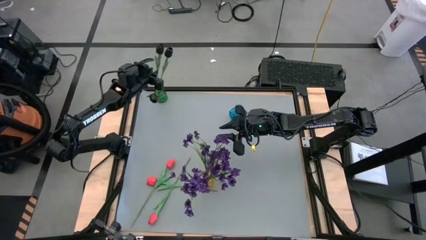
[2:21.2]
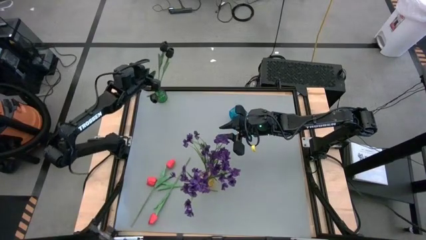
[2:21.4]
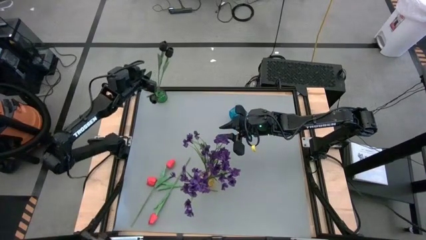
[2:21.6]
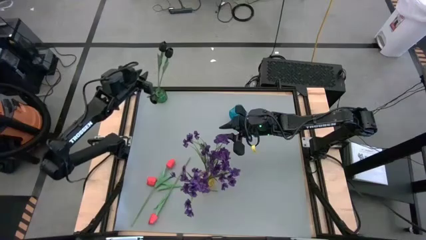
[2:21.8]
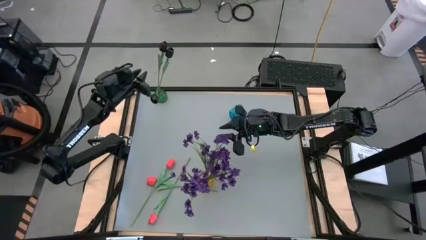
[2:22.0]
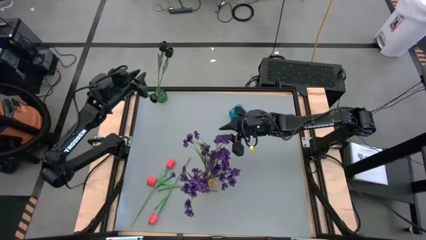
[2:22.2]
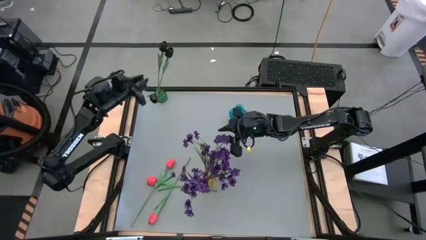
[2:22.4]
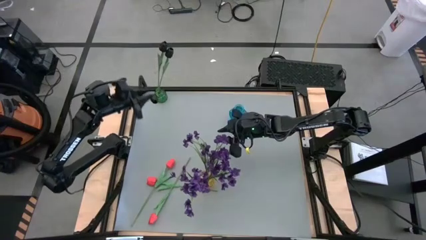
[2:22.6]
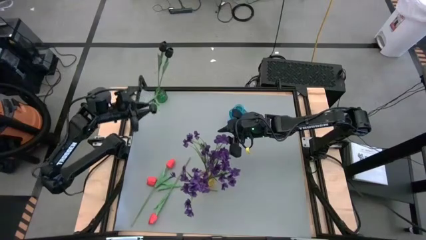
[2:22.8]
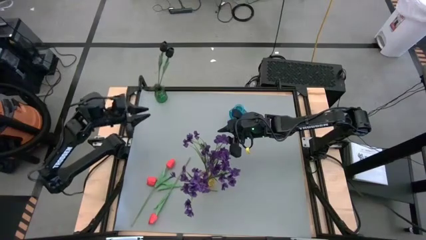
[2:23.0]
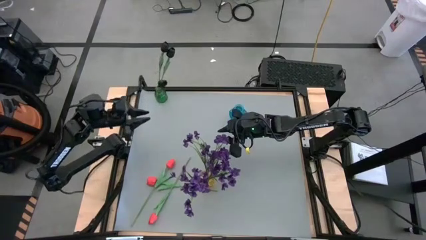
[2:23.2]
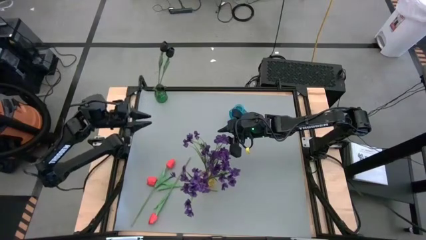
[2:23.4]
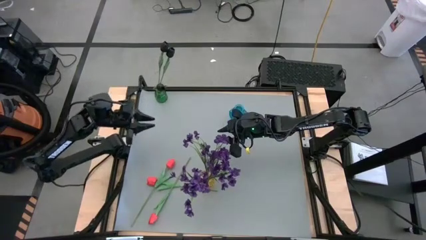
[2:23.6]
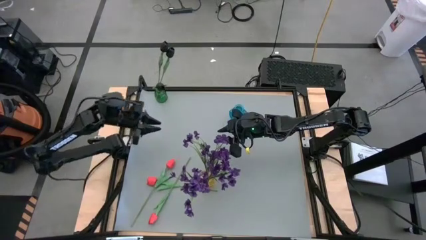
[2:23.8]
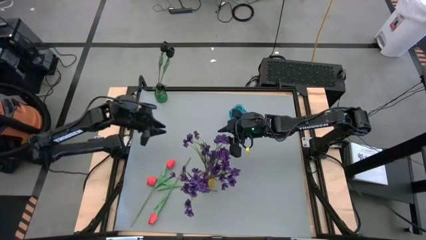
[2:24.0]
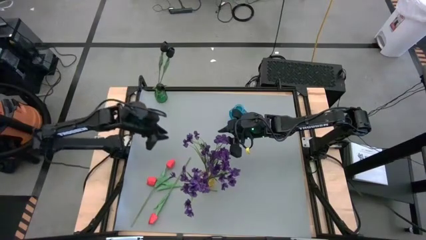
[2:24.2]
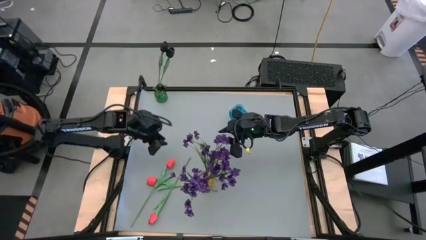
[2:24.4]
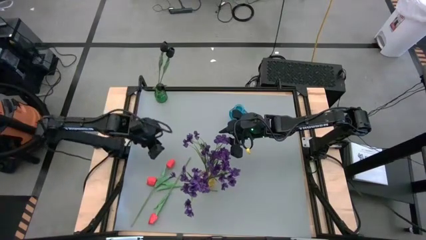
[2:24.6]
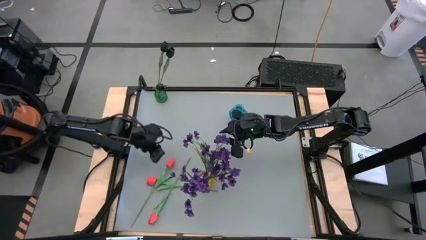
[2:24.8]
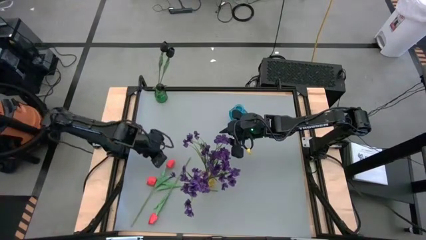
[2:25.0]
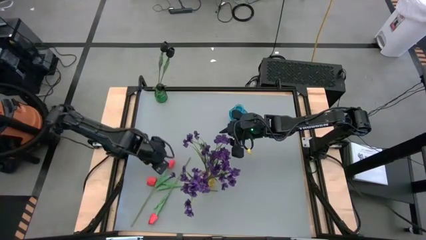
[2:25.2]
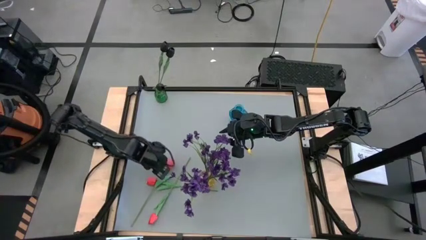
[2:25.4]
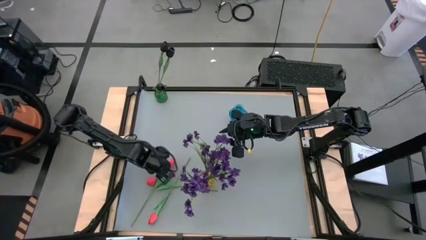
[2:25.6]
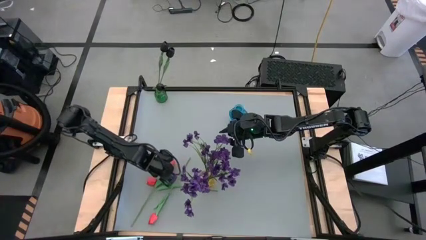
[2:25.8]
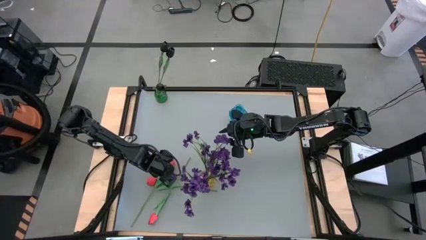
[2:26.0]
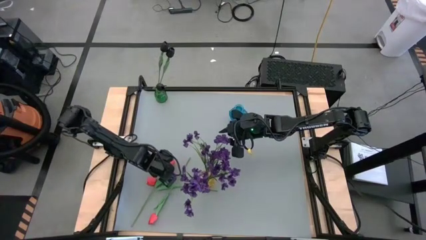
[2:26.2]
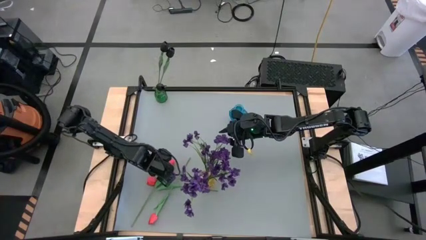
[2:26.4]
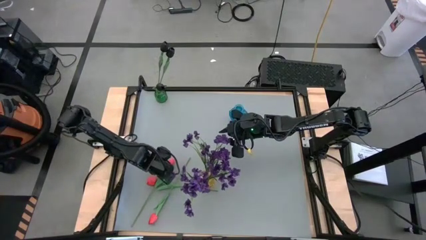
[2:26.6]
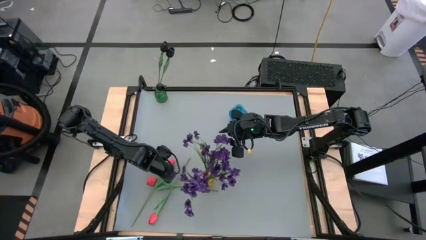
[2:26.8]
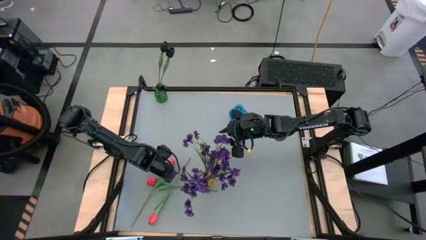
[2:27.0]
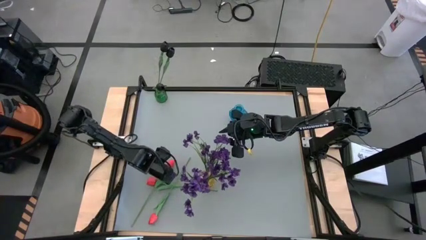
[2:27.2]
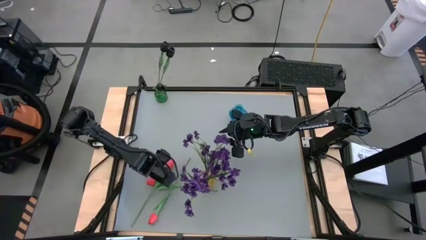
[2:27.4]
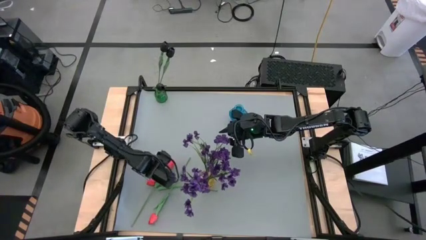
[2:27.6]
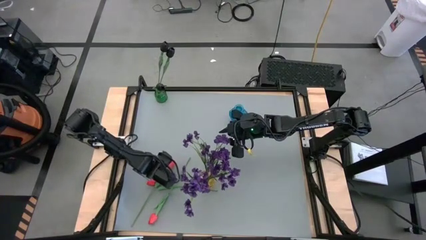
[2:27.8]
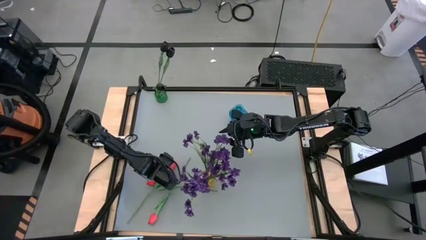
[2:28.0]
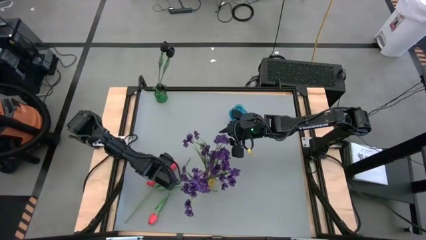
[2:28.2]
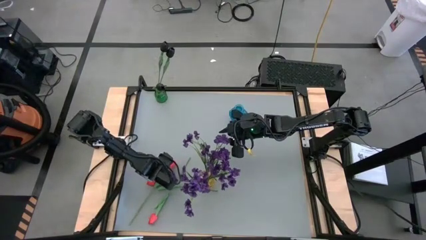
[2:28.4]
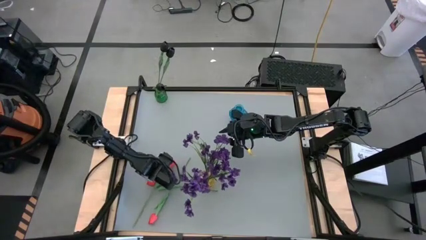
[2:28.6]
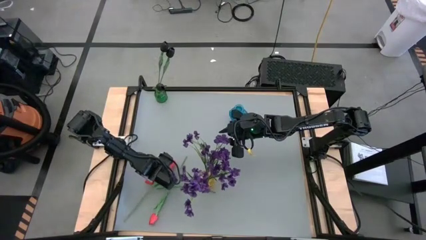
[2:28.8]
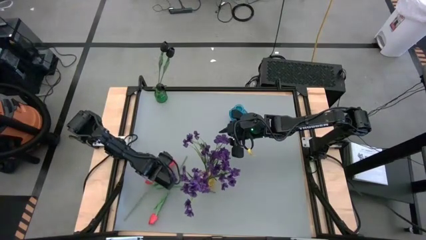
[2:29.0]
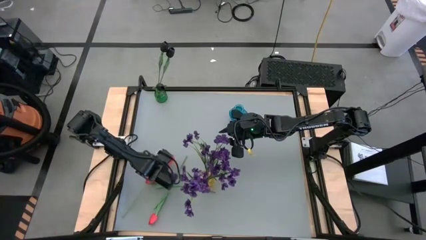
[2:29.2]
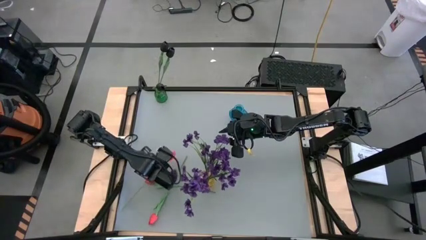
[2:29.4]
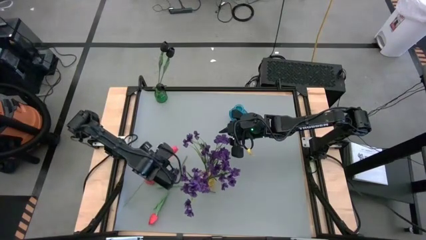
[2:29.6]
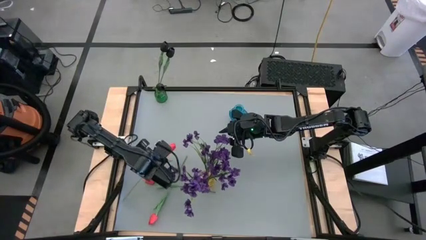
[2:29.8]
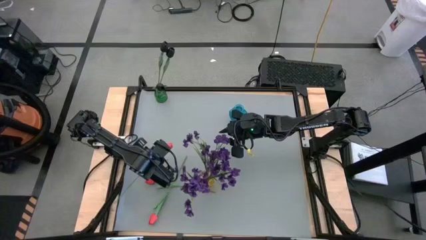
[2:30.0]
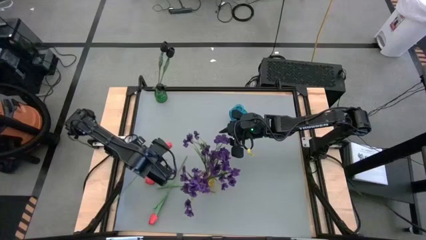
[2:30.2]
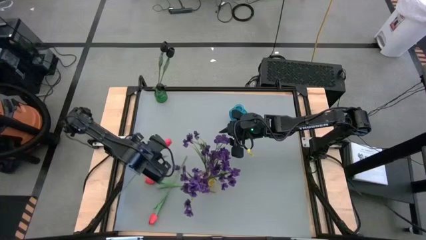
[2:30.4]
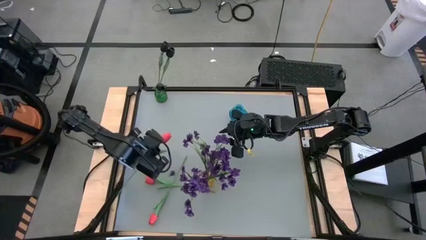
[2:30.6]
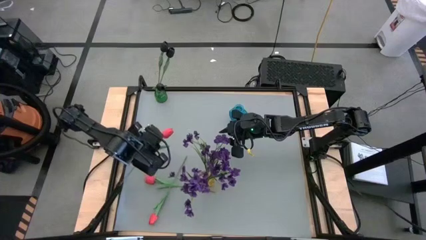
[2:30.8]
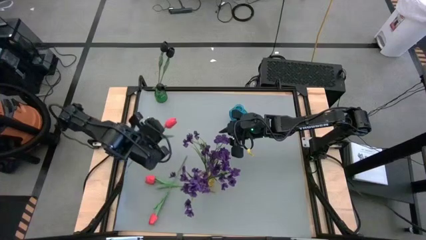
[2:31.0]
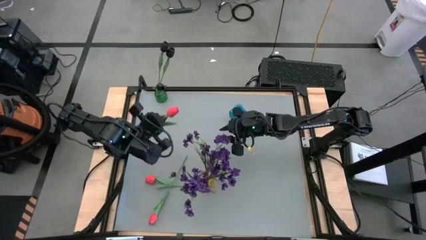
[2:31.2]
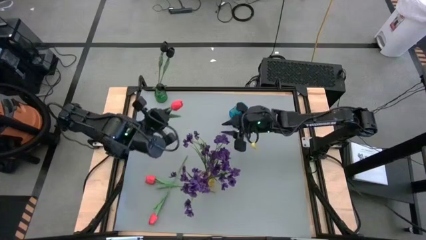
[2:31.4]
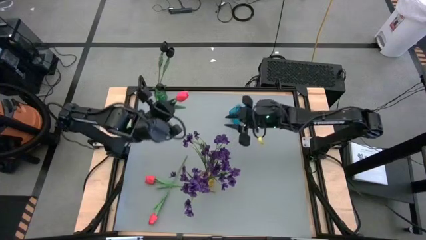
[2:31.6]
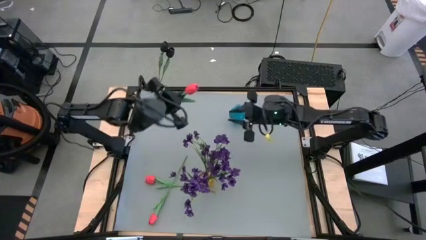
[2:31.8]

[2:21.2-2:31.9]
Task: Sort flowers into vase by color
Put the top pink flower into the blue vase

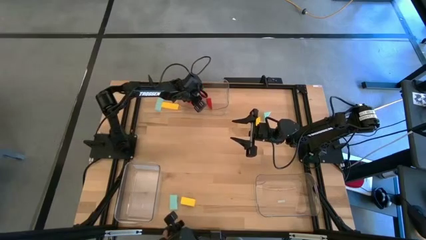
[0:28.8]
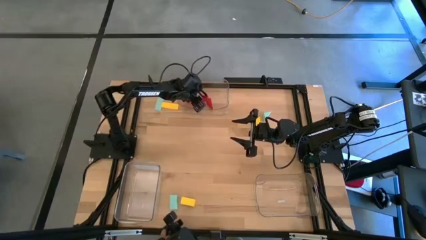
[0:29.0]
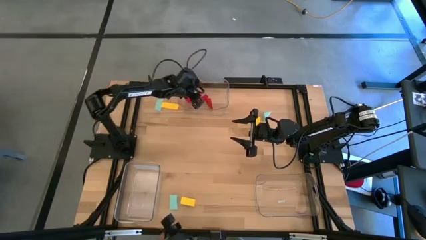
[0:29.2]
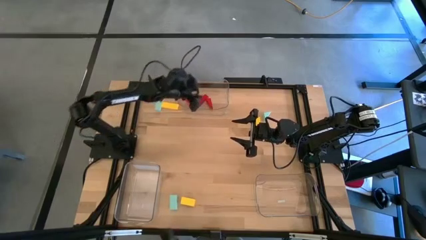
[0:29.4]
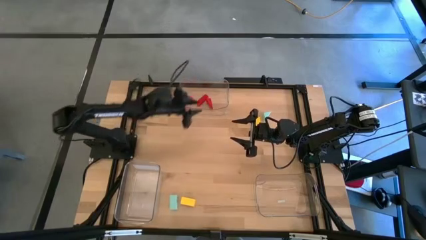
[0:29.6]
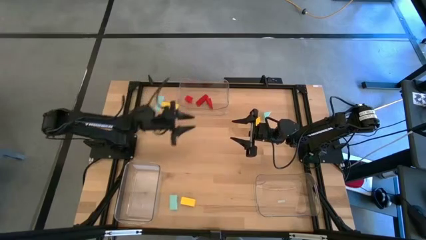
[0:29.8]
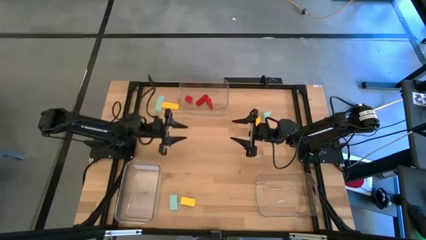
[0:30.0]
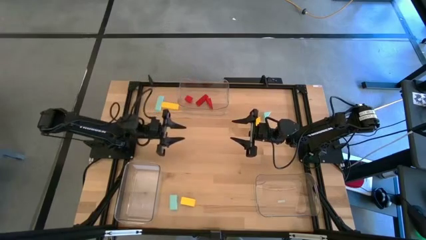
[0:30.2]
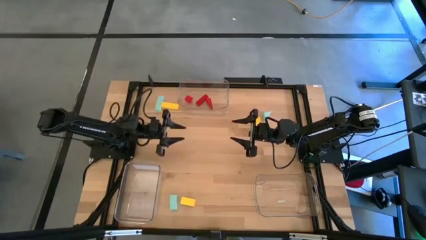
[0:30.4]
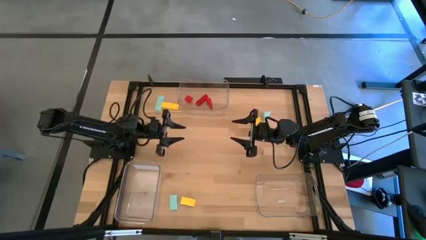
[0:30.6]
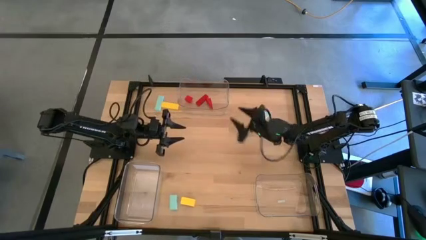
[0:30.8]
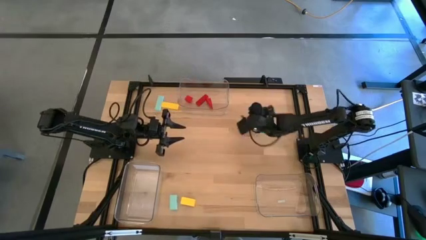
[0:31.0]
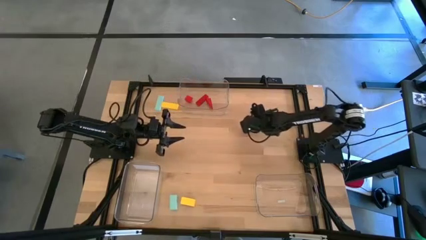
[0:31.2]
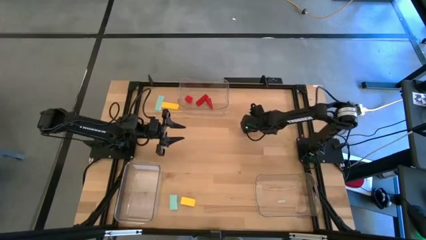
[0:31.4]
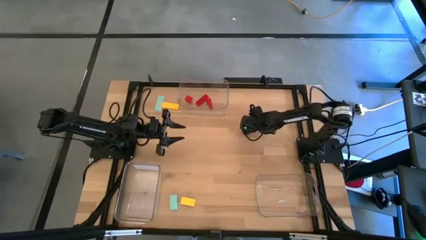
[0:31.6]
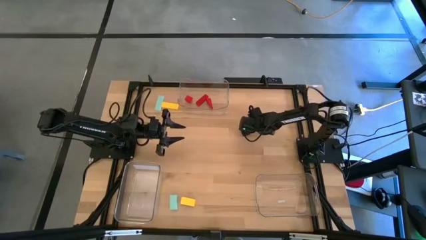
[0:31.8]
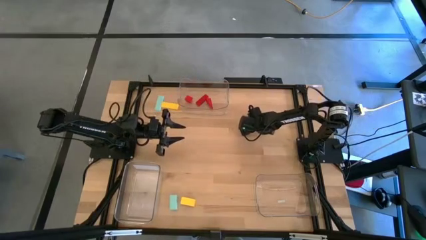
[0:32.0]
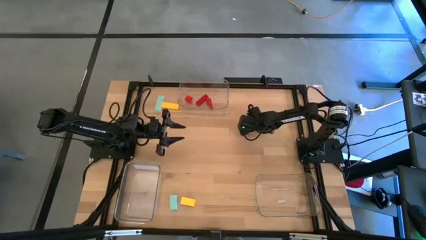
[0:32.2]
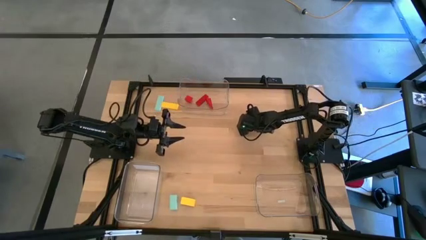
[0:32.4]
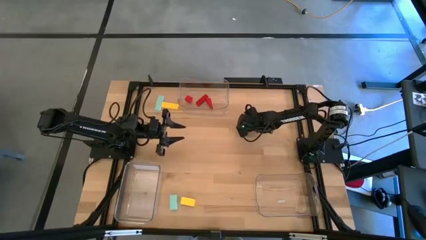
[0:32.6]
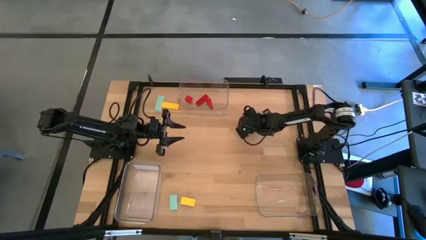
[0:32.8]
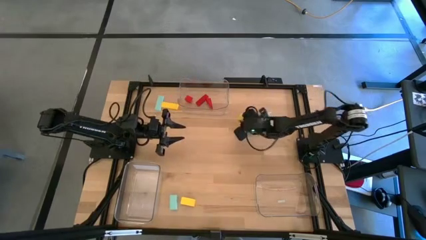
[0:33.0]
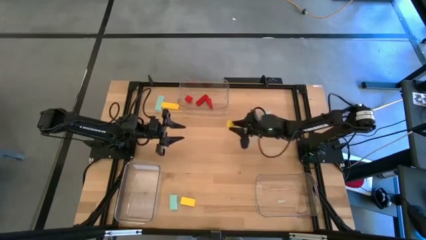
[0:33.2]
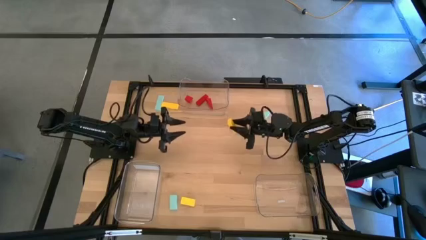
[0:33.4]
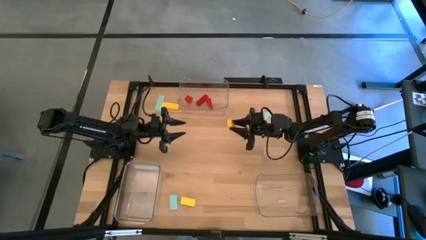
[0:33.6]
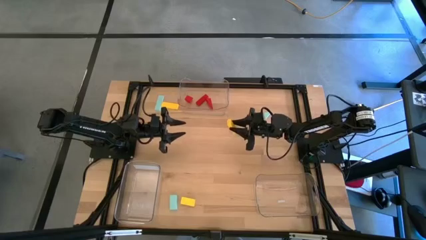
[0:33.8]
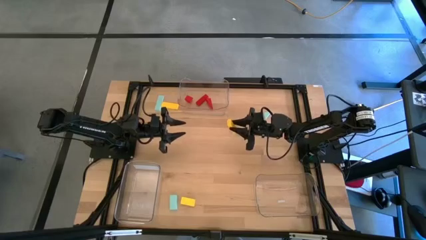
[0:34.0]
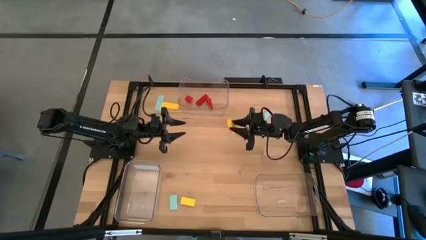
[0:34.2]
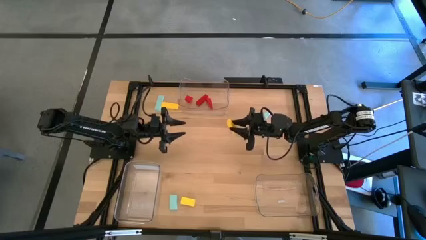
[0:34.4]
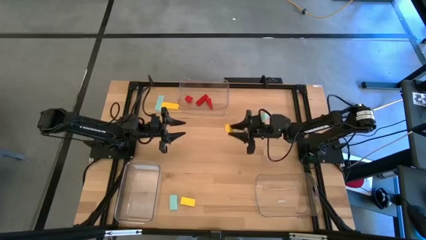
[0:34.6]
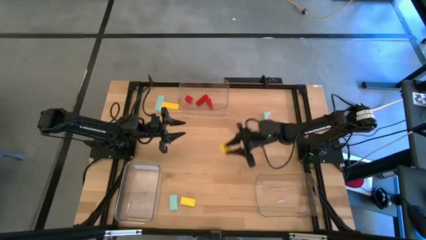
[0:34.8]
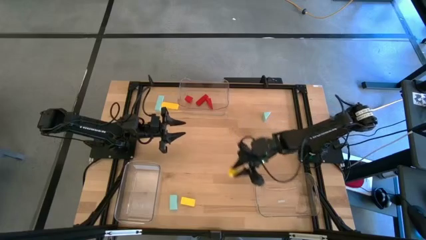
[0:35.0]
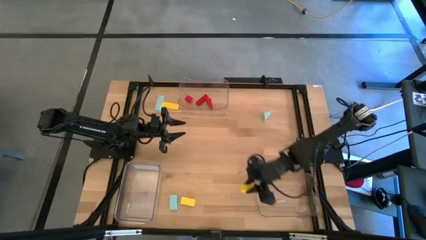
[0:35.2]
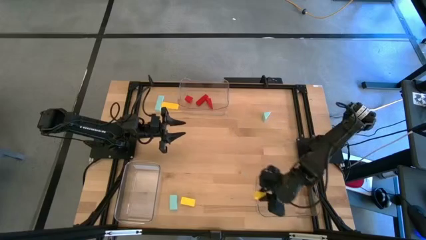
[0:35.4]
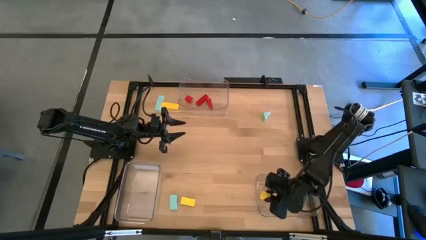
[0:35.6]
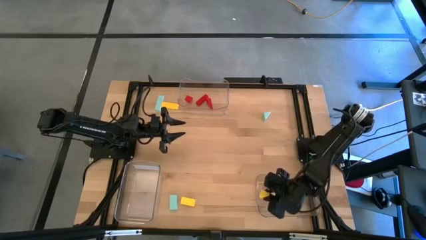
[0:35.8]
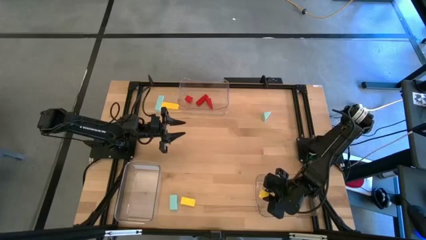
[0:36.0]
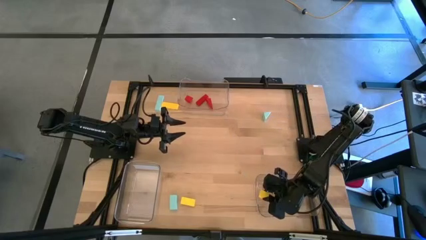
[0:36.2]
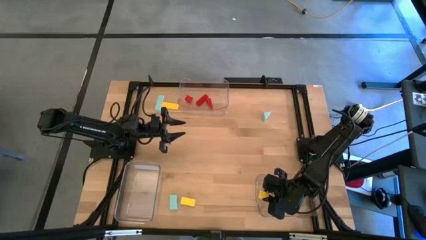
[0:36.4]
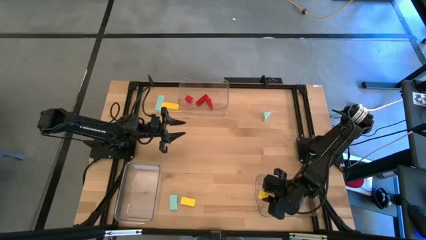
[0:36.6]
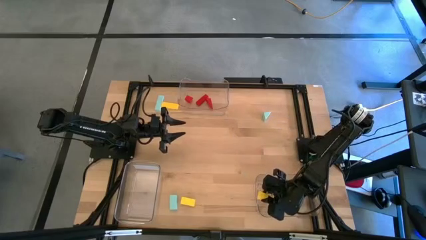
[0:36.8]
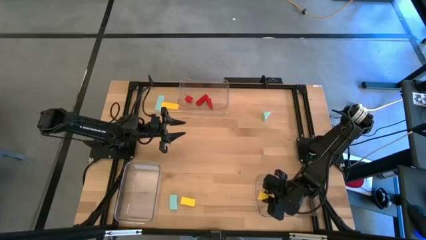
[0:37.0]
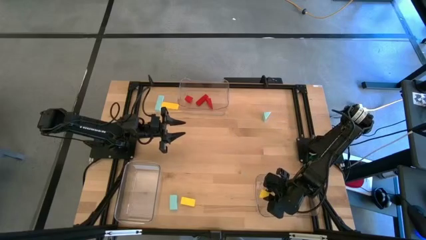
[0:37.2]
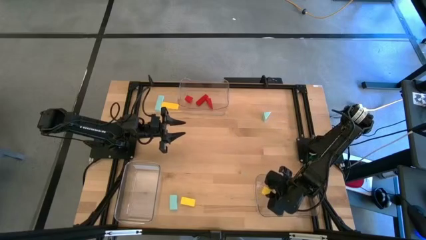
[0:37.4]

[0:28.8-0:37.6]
Task: Sort & place blocks by color
Put the top right yellow block into the bottom left transparent bin
